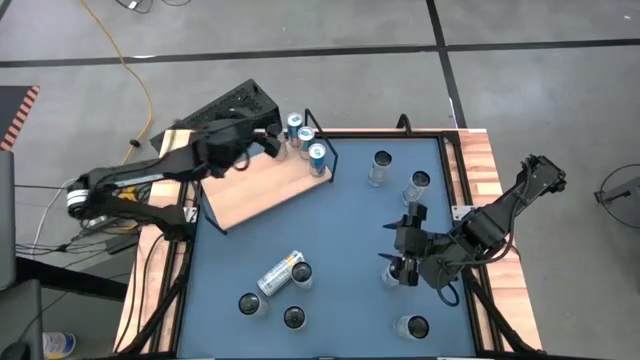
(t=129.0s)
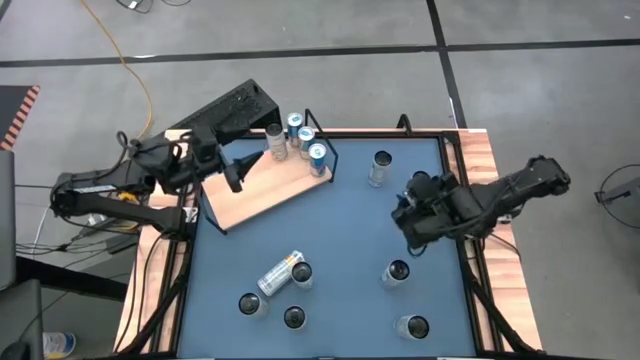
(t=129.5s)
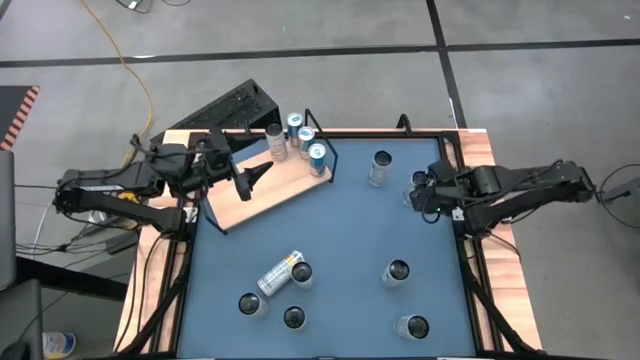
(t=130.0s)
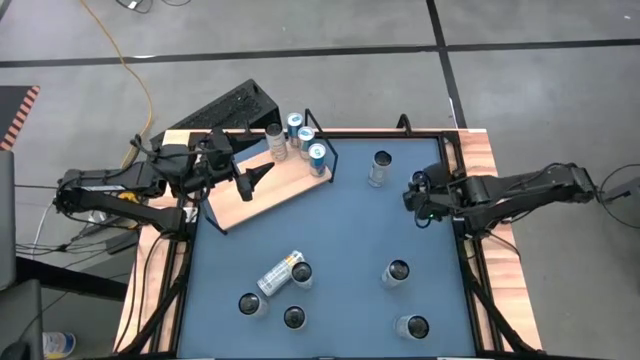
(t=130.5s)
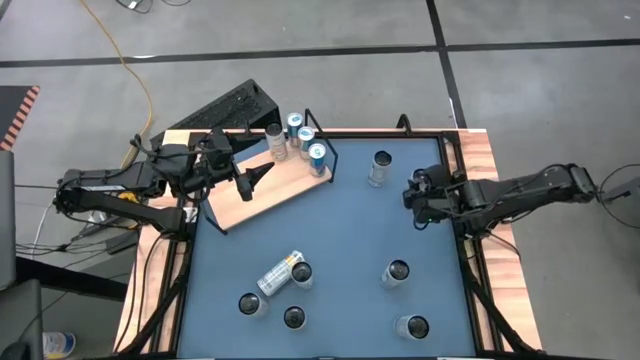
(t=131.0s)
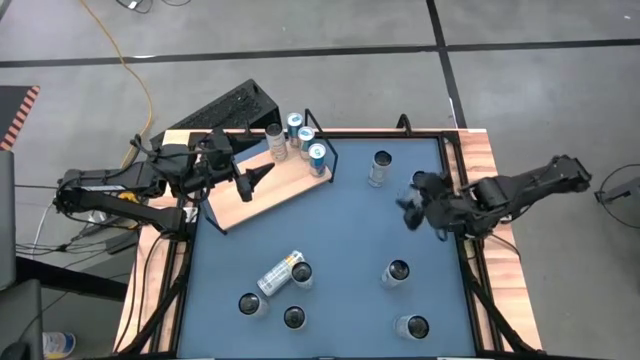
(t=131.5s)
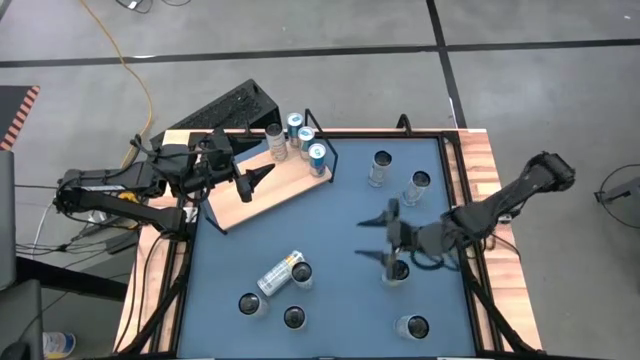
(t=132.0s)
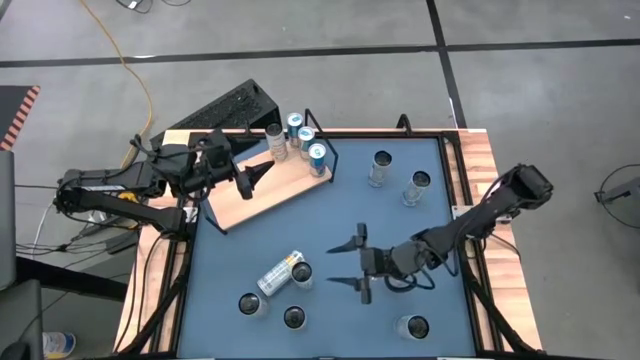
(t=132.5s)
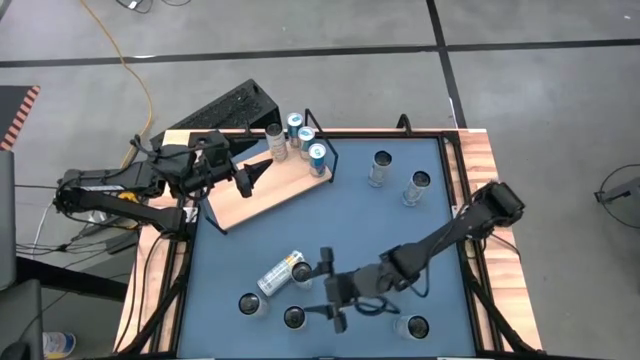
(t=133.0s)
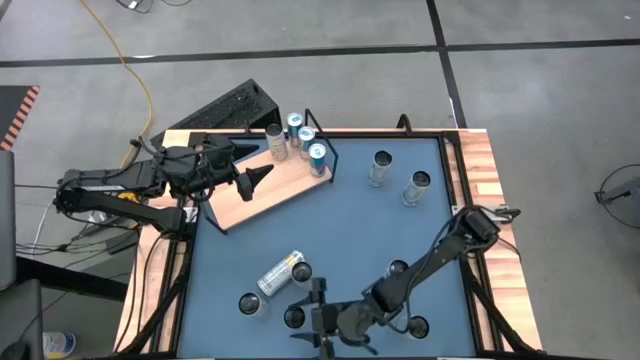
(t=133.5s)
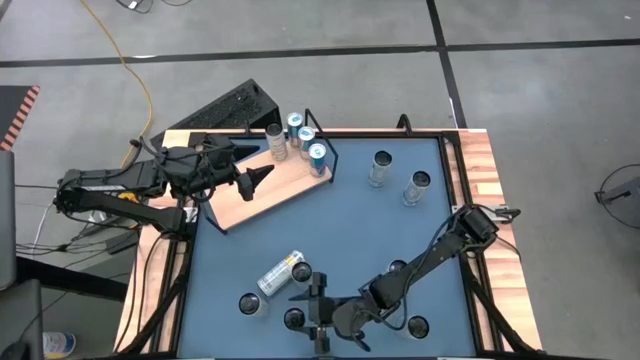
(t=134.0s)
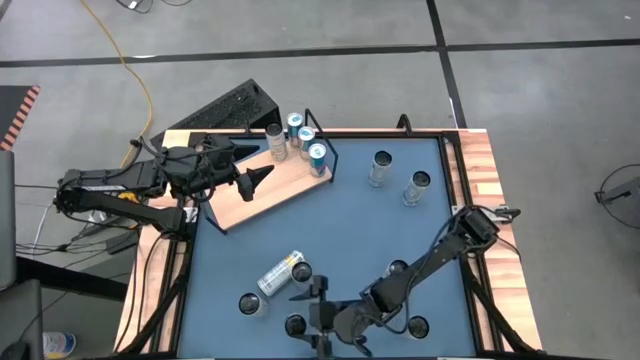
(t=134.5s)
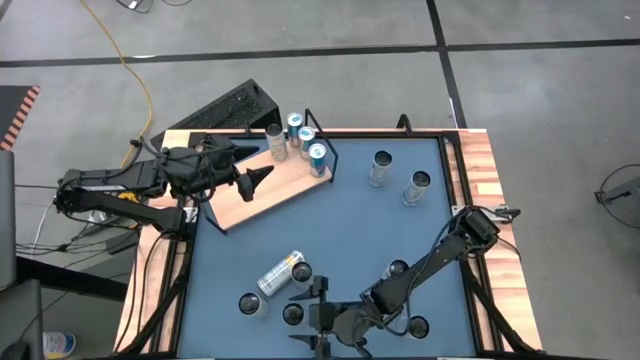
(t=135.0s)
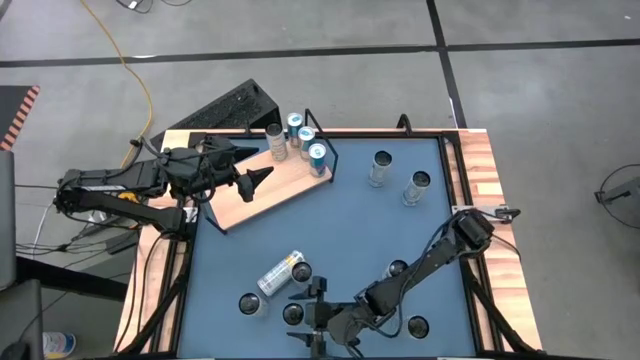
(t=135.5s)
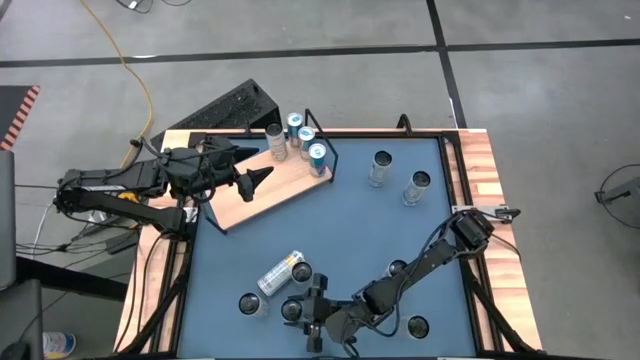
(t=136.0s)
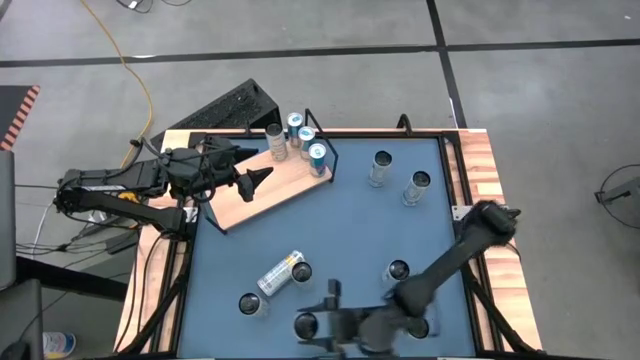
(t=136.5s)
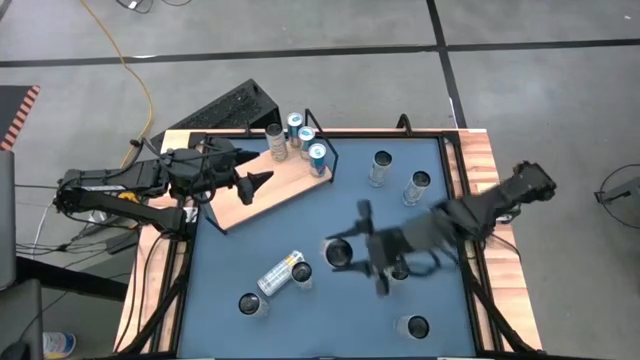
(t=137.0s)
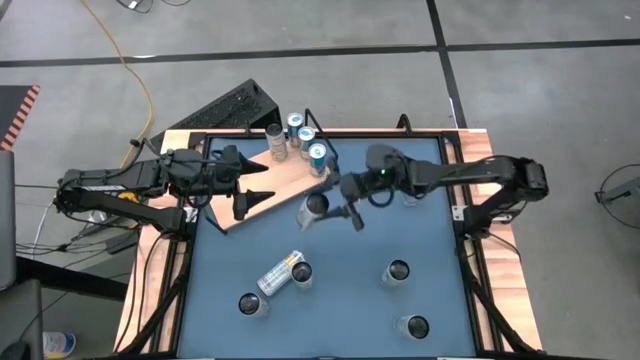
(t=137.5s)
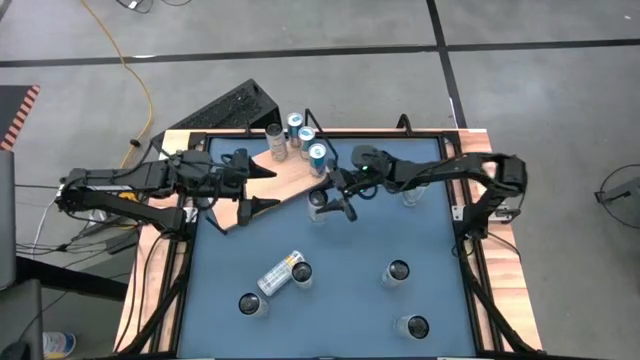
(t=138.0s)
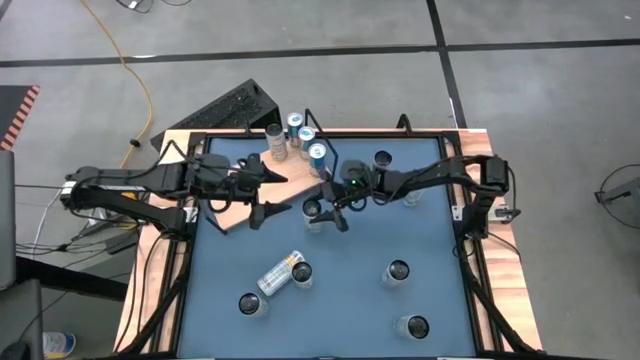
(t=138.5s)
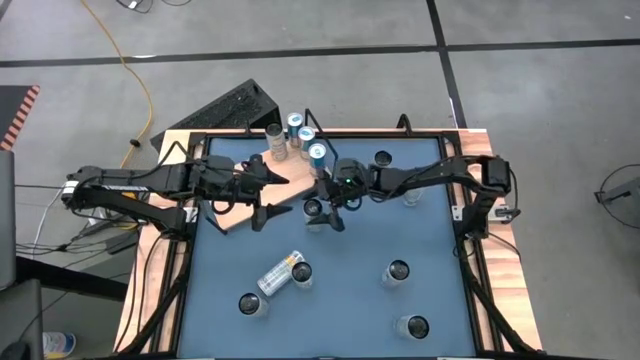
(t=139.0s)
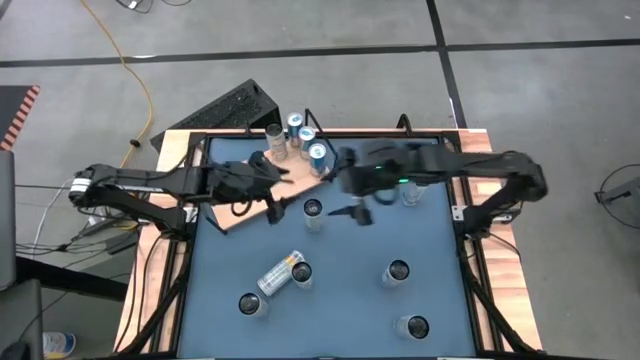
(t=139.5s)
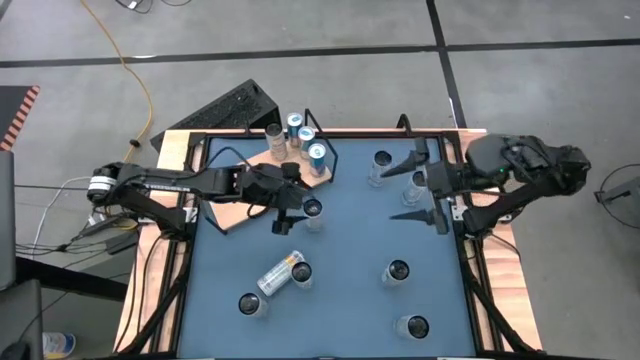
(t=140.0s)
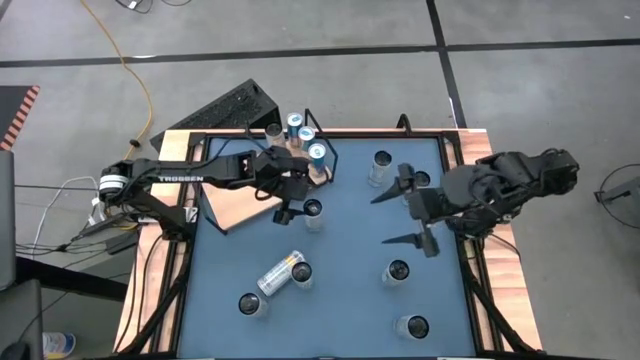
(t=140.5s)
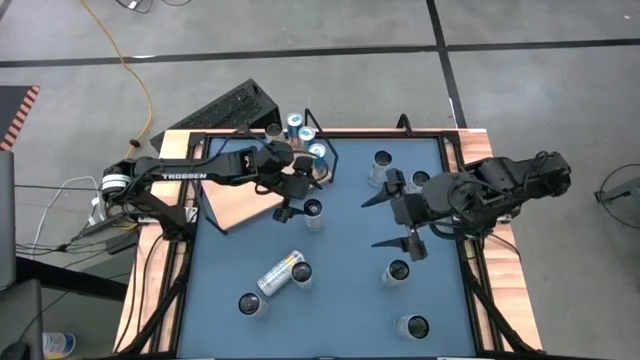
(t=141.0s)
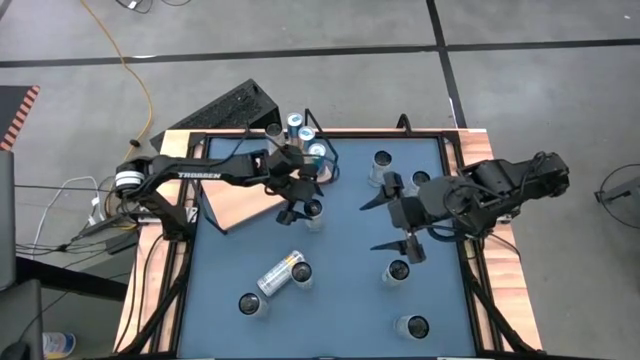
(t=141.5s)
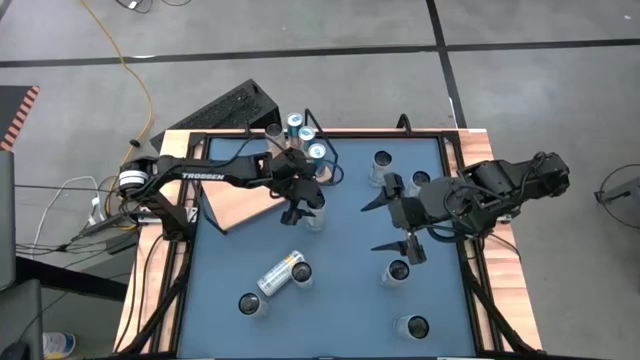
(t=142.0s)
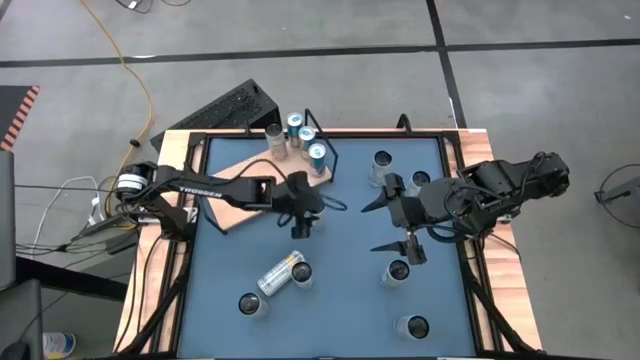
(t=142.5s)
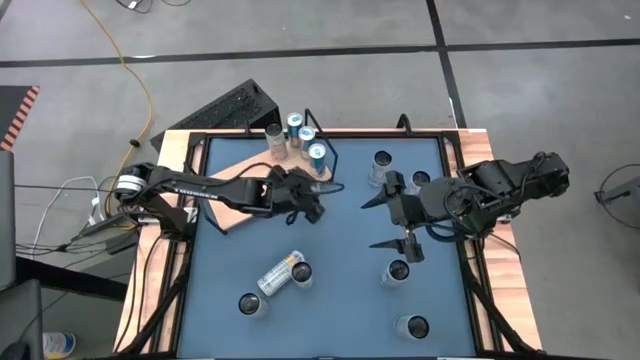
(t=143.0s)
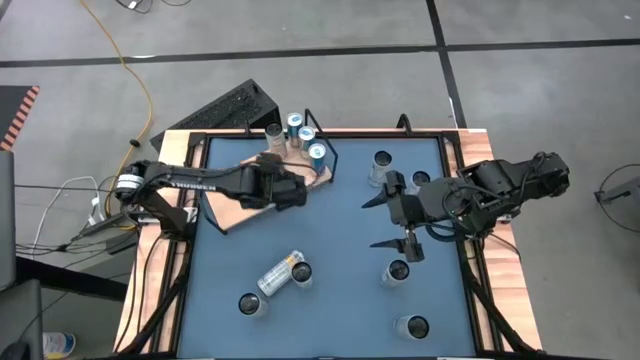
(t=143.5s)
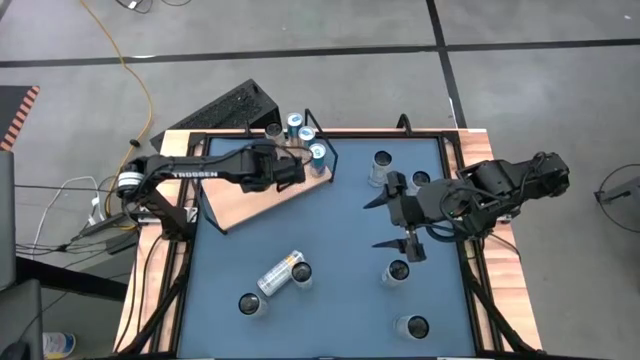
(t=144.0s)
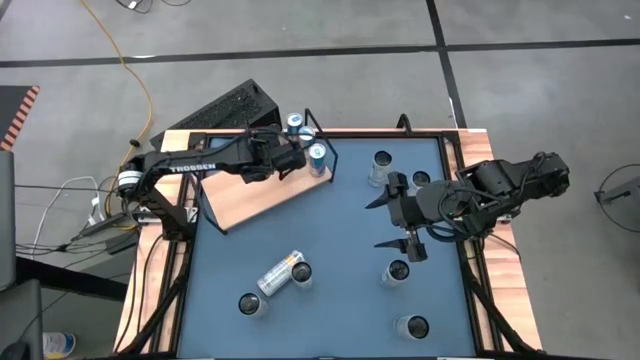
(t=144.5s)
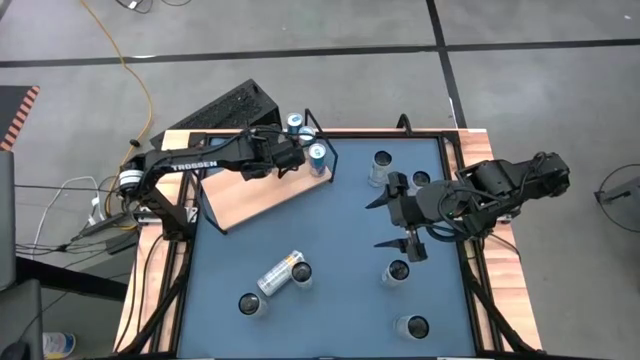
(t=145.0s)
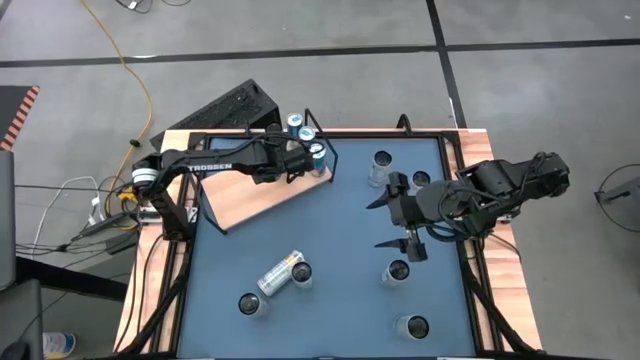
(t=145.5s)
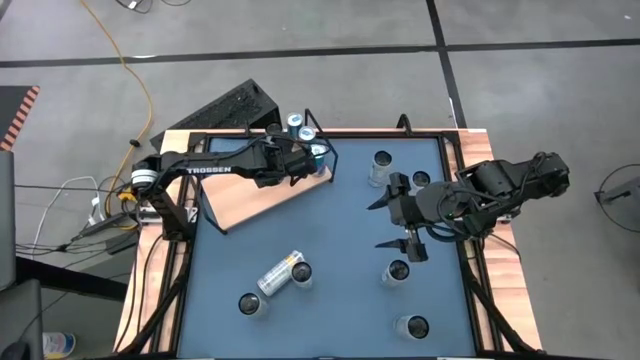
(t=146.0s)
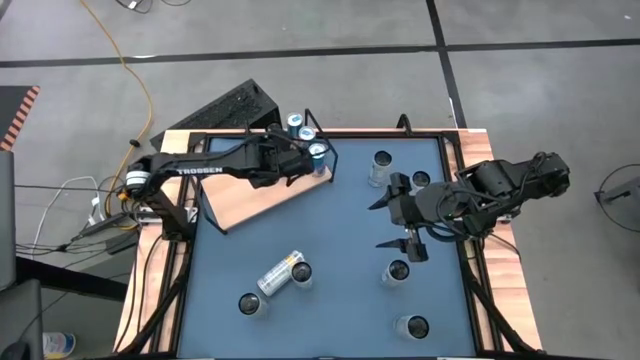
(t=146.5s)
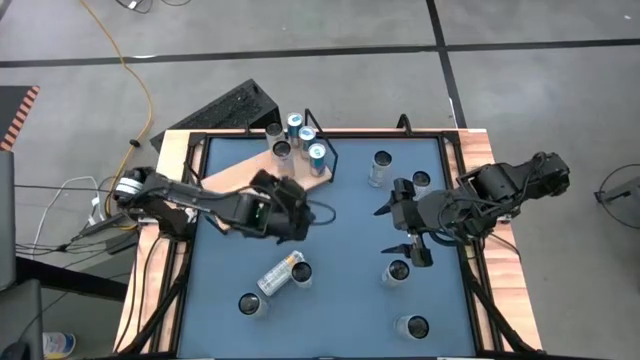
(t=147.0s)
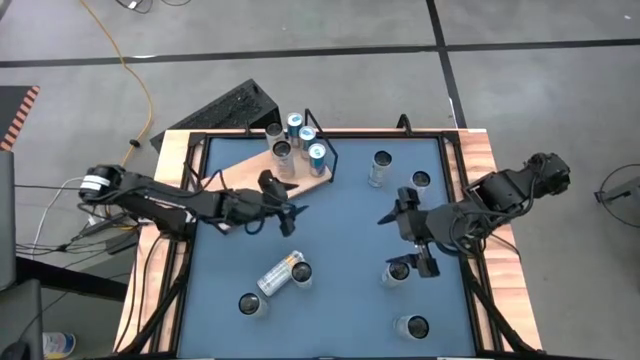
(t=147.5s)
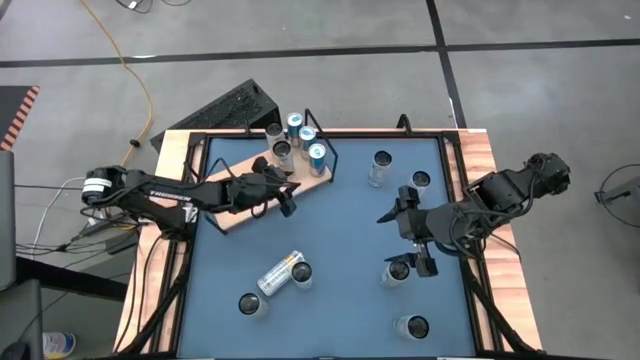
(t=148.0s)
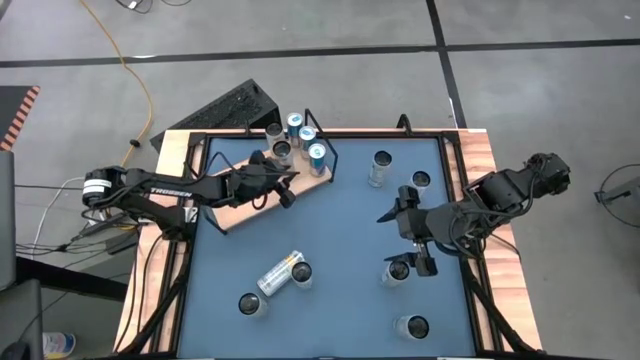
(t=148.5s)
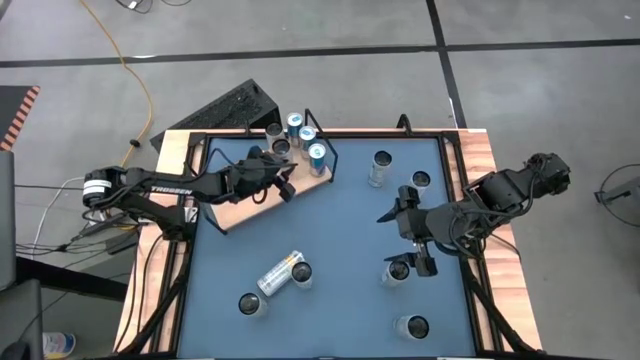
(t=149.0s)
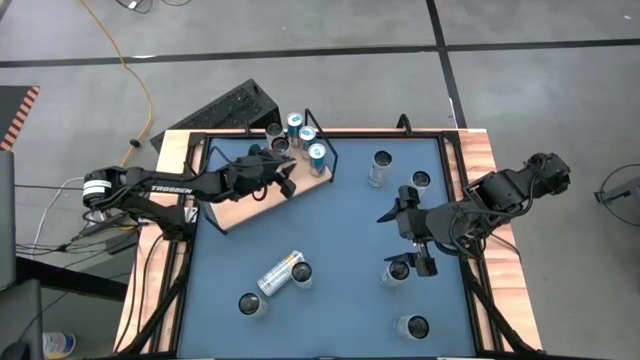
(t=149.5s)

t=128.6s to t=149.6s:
Task: Place canned beverage on shelf
Put the bottom white and yellow soda can on the shelf aligned with the other white and yellow soda can
